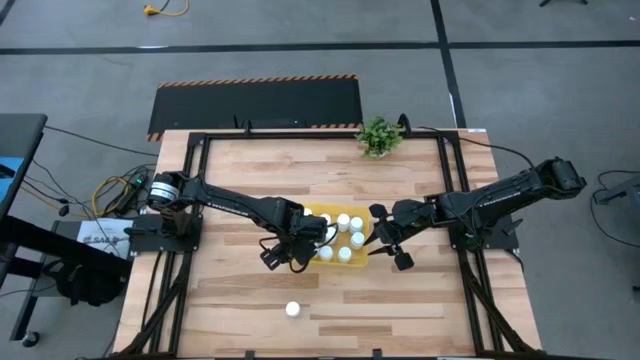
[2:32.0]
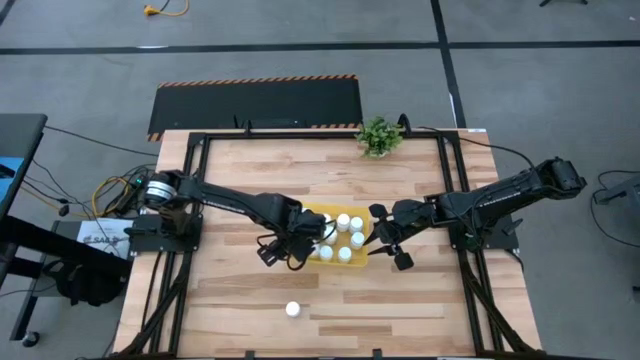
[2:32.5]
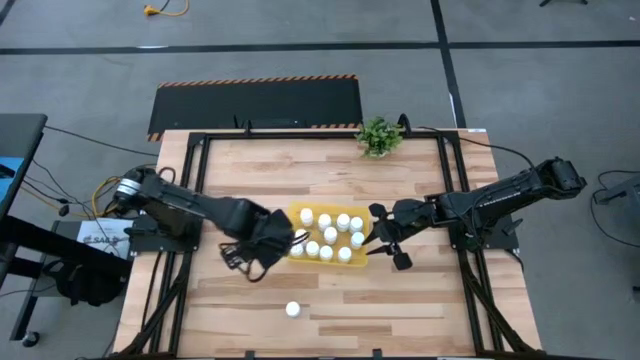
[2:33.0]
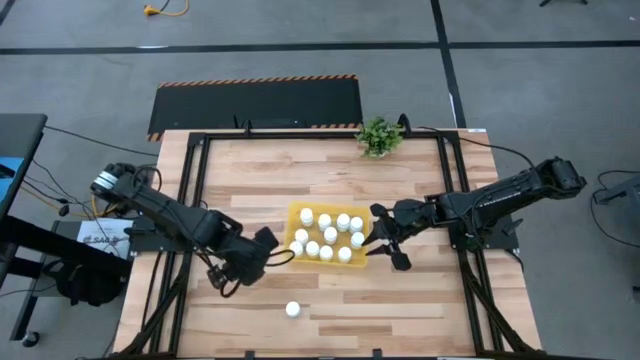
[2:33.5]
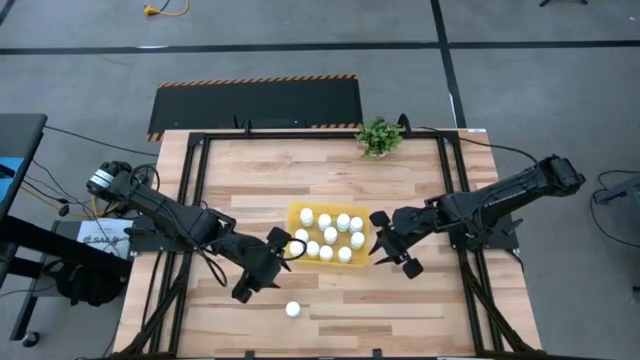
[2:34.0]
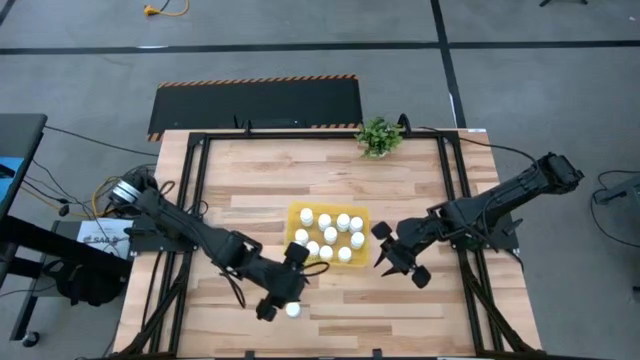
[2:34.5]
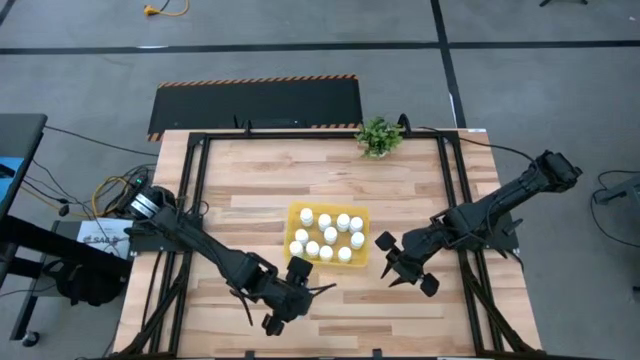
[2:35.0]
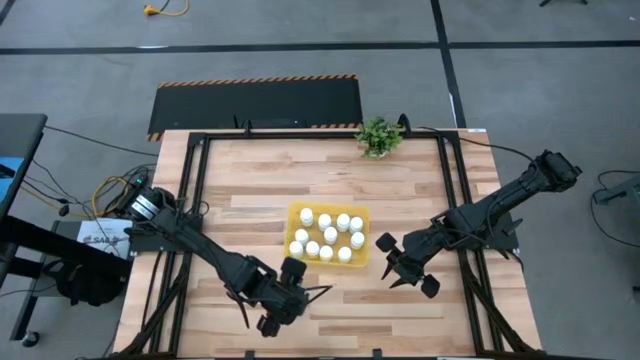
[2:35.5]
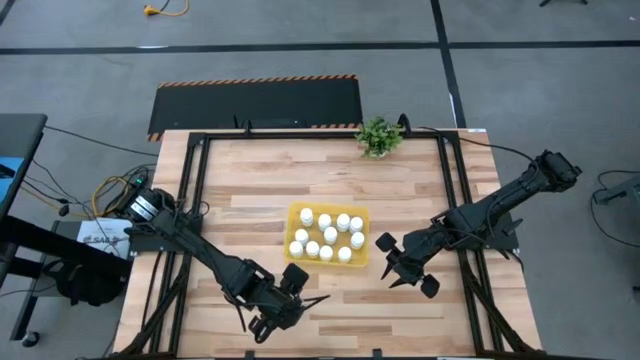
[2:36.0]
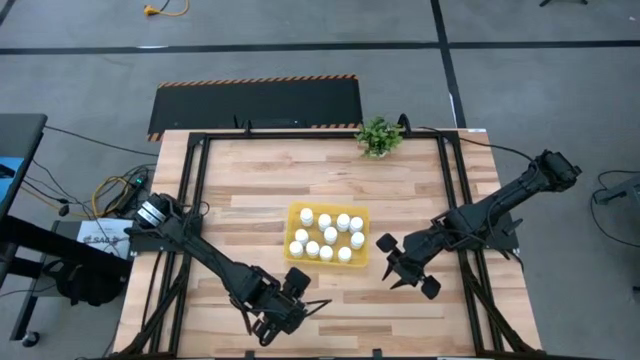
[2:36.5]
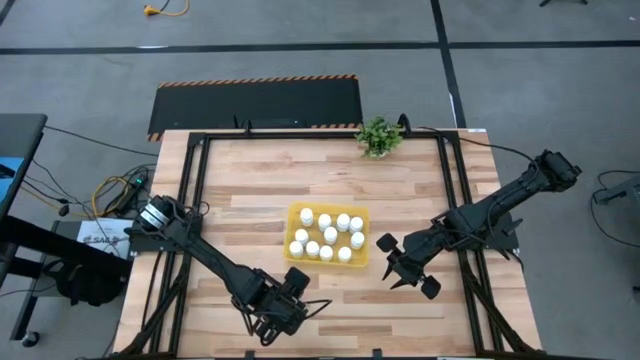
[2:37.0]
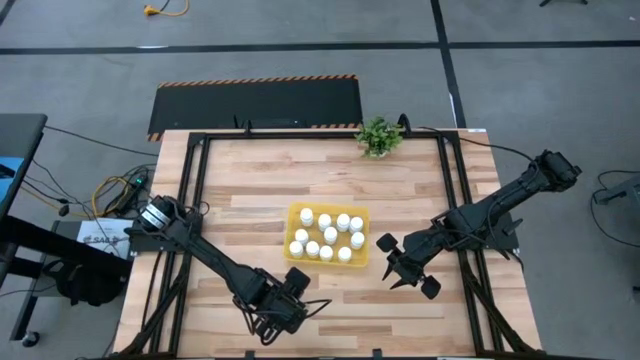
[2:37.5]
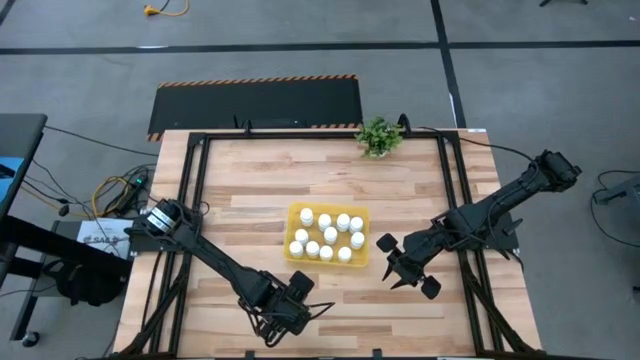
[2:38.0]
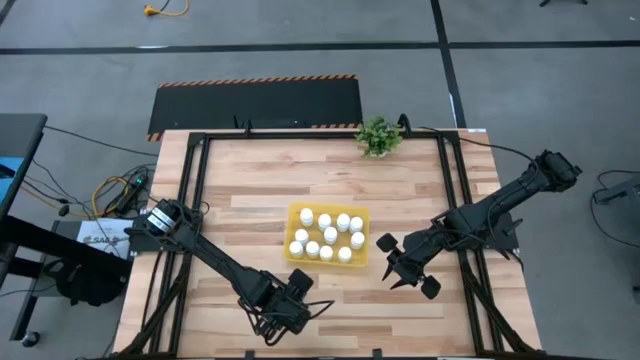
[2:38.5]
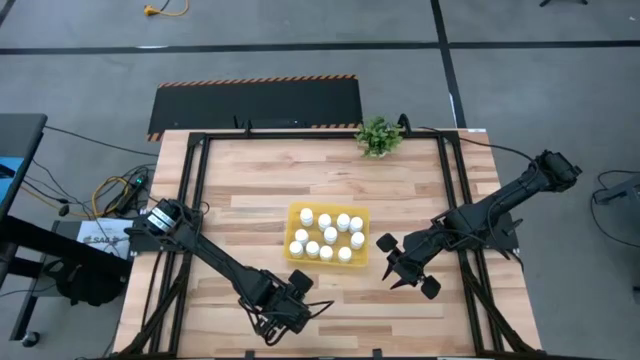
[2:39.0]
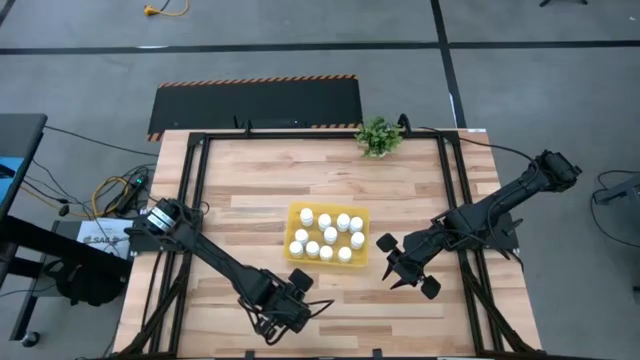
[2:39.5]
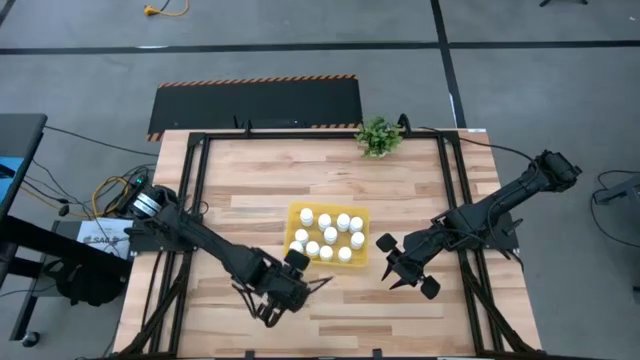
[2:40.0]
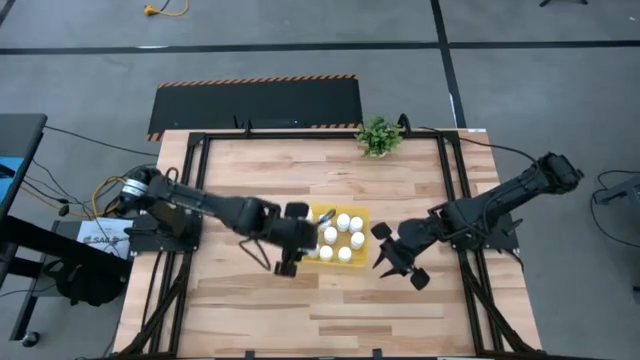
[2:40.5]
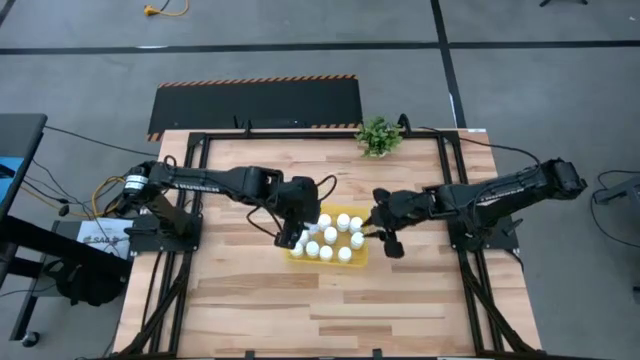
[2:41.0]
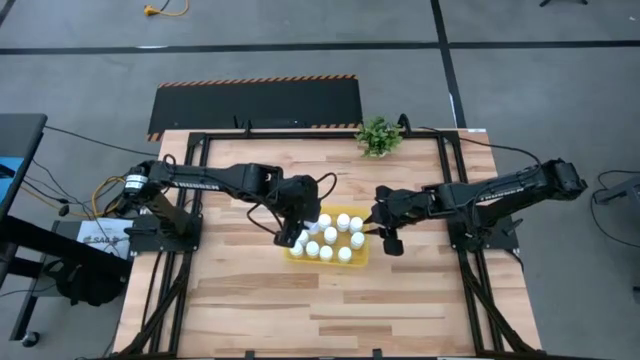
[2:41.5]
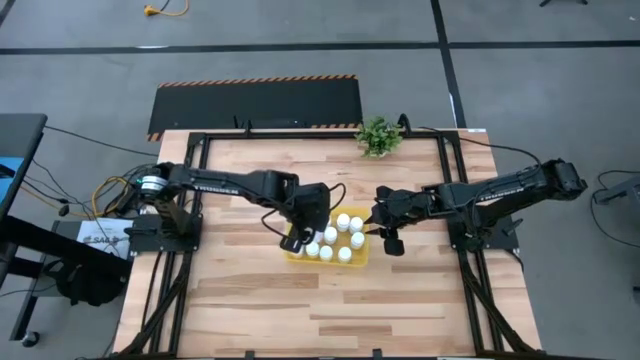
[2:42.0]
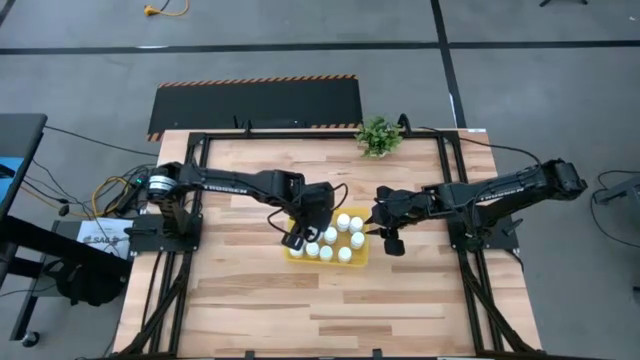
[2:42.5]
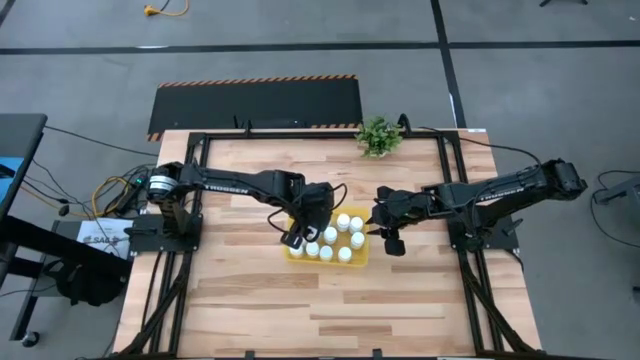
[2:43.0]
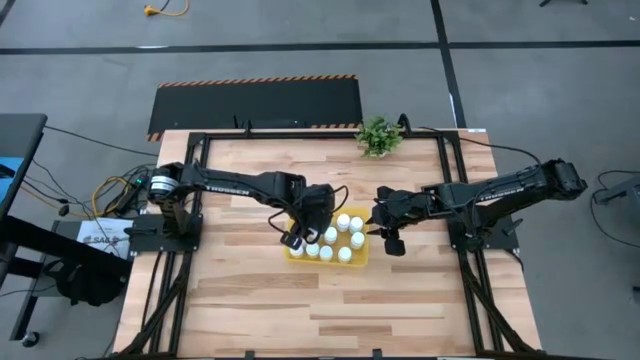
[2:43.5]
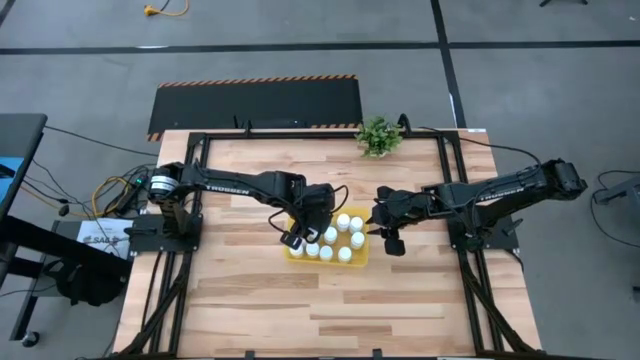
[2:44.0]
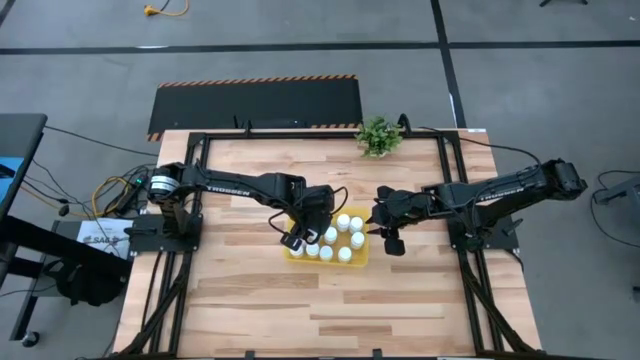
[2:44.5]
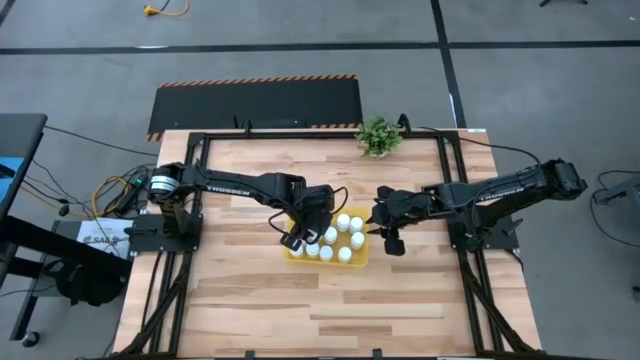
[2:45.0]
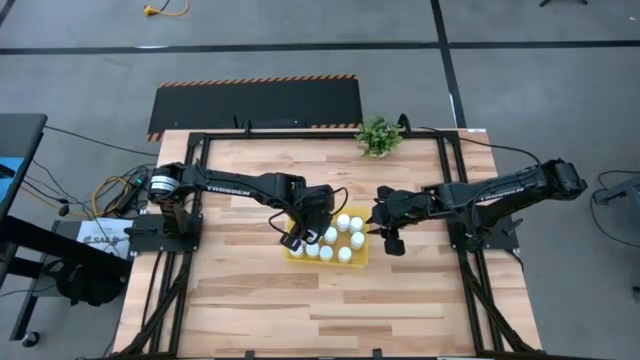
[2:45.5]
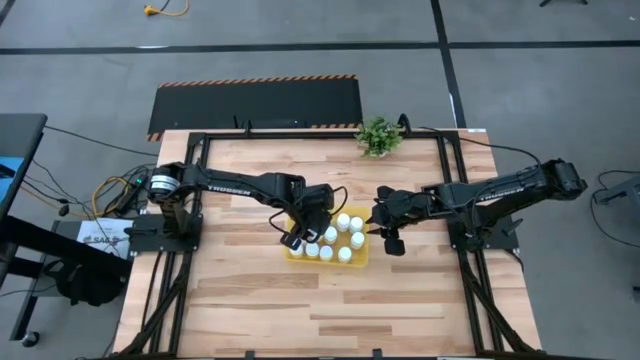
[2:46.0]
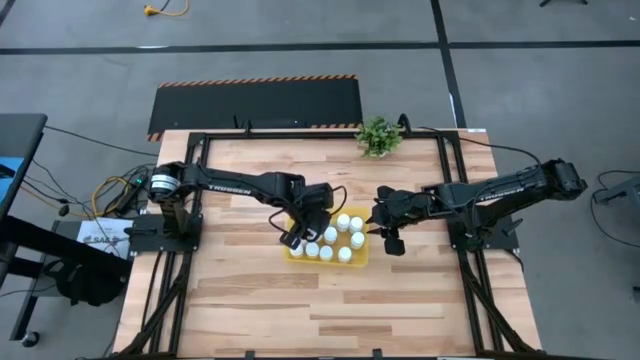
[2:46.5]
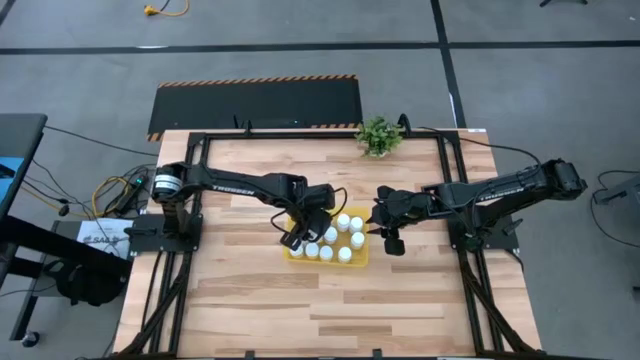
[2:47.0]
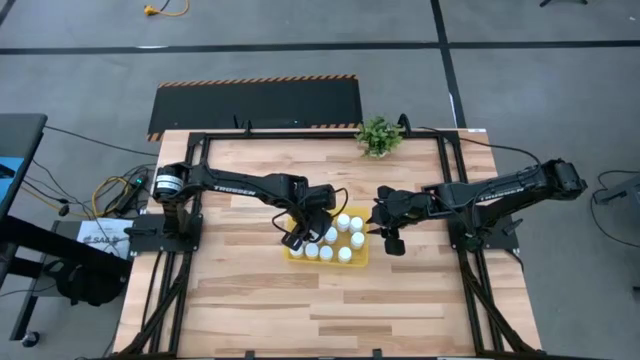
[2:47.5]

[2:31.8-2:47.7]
Task: Pick and place pill bottles into a basket
Put the white pill bottle into the yellow bin

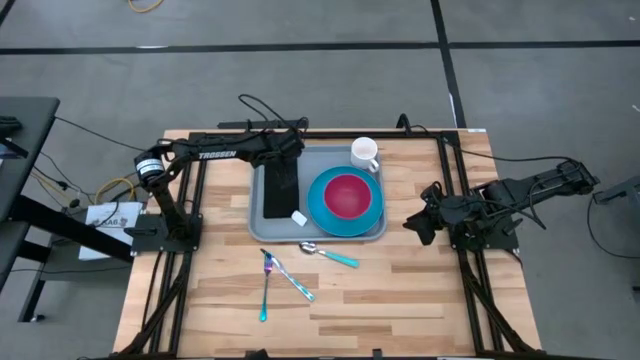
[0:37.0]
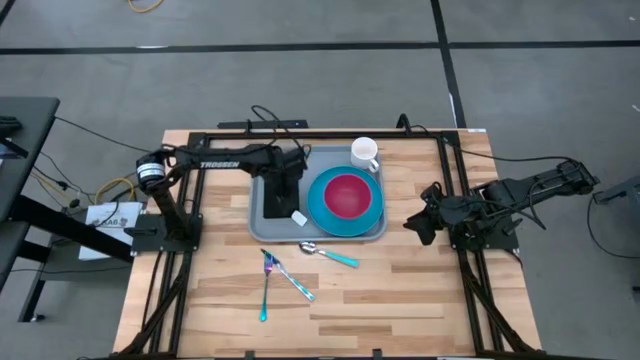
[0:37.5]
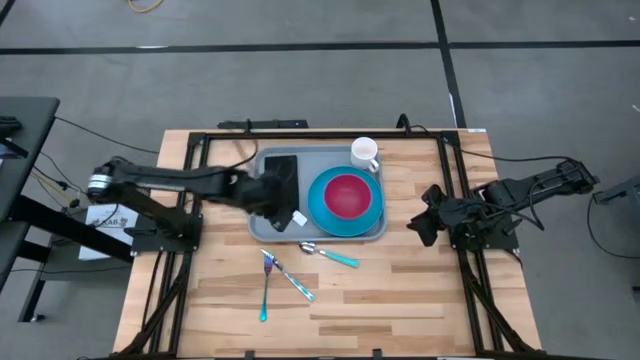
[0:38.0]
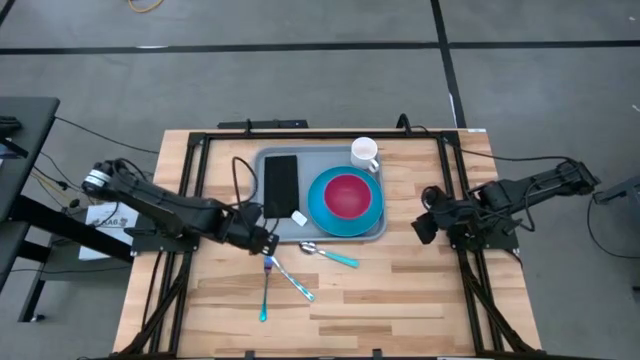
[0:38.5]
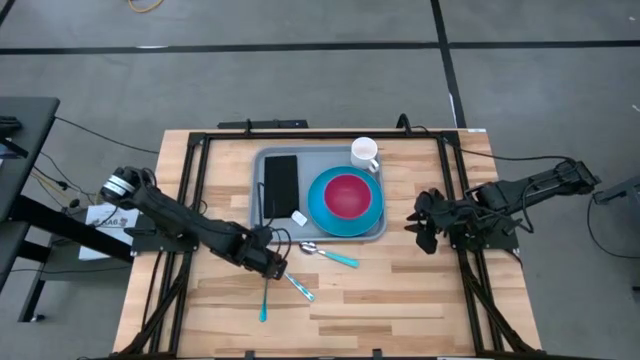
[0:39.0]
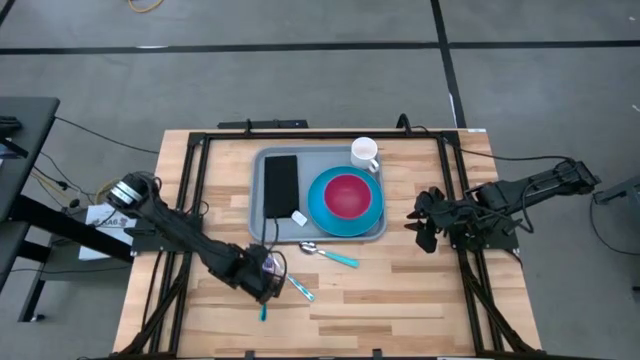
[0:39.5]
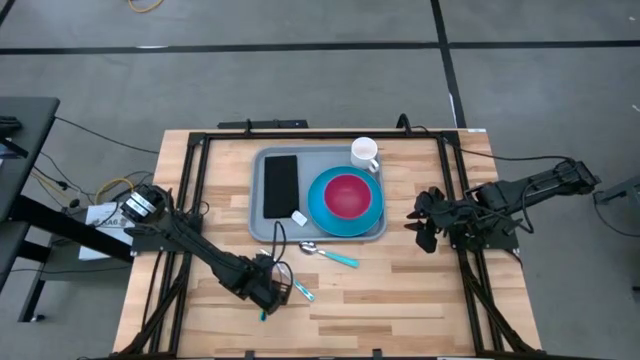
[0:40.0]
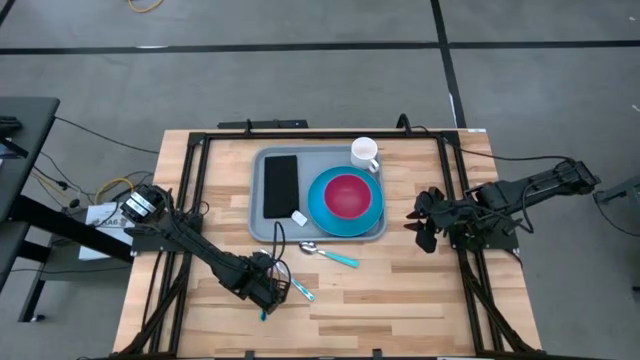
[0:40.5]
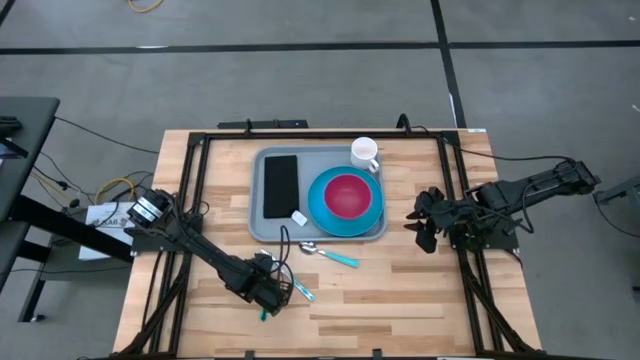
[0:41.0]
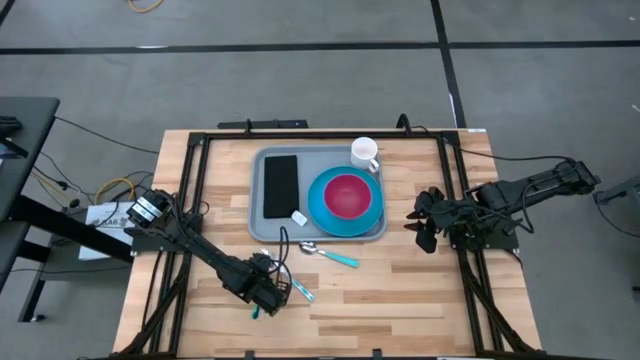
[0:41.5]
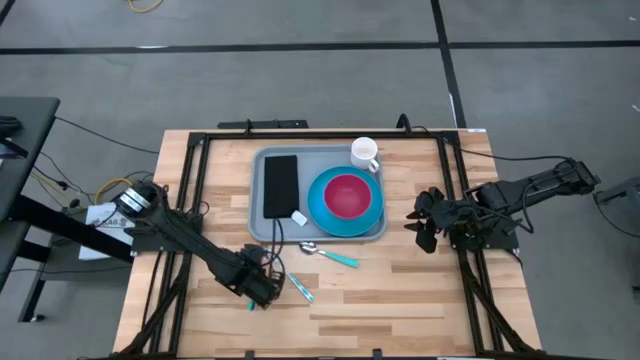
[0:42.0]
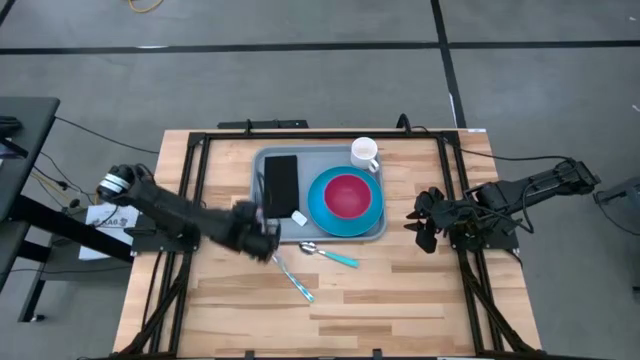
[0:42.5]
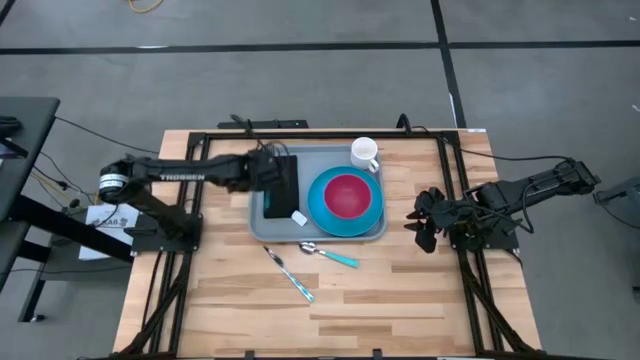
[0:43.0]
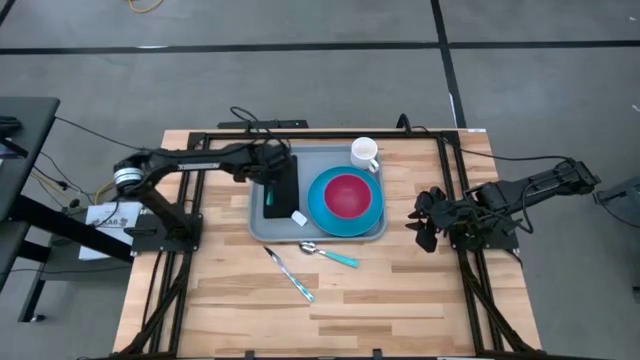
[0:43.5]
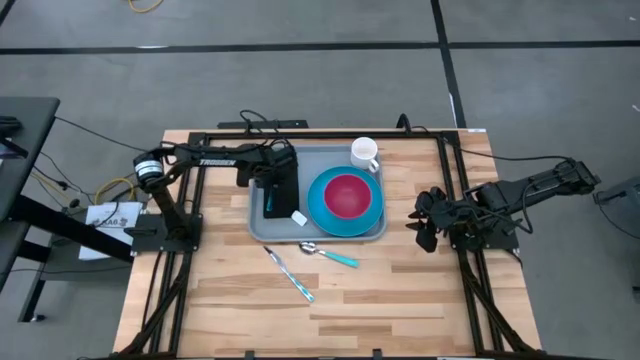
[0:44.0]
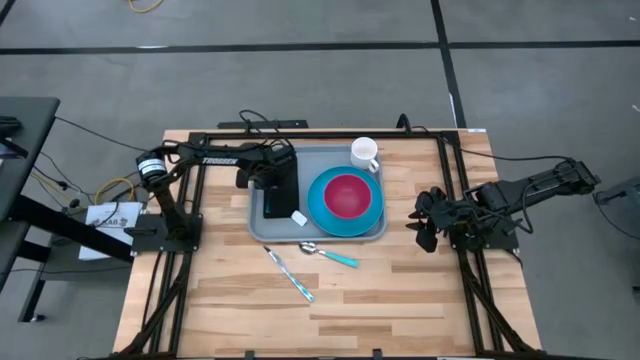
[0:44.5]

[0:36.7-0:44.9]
Task: Set up tray
Put the blue fork on the black napkin on the gray serving tray
